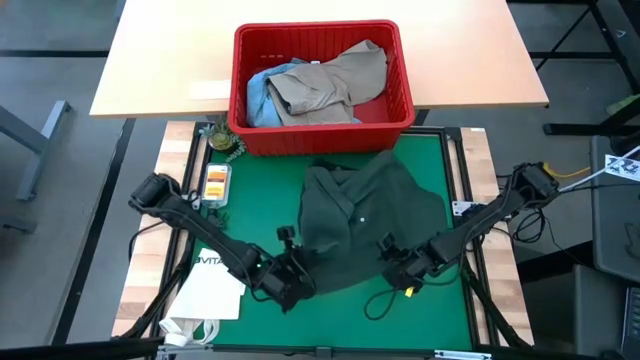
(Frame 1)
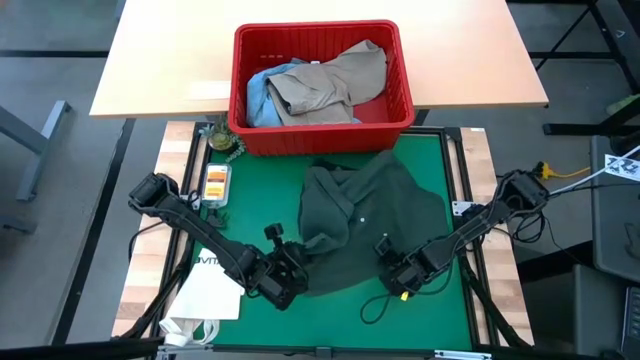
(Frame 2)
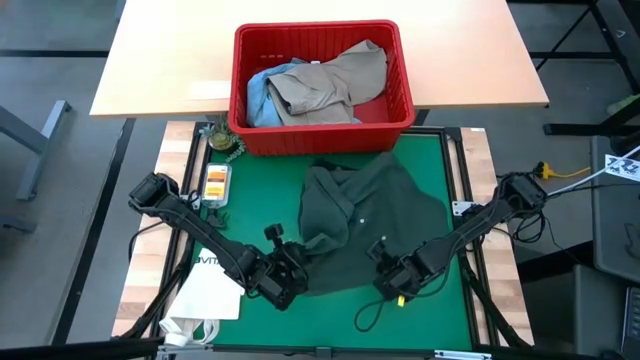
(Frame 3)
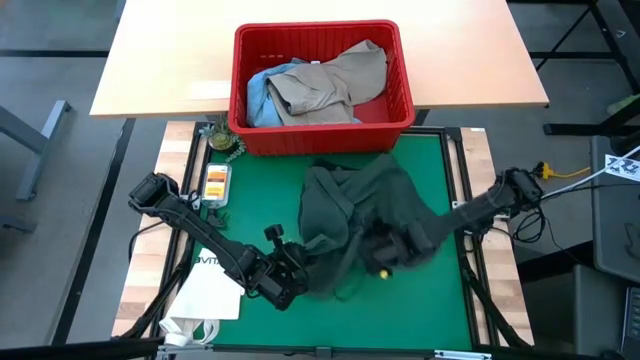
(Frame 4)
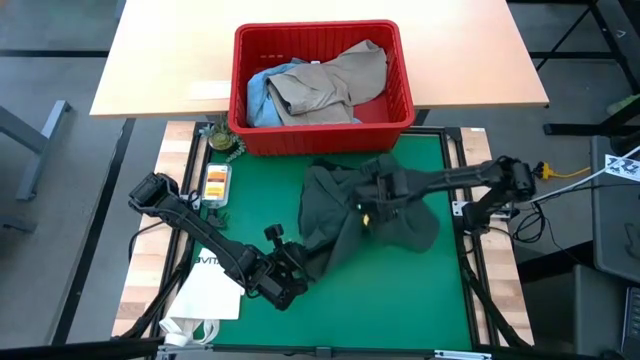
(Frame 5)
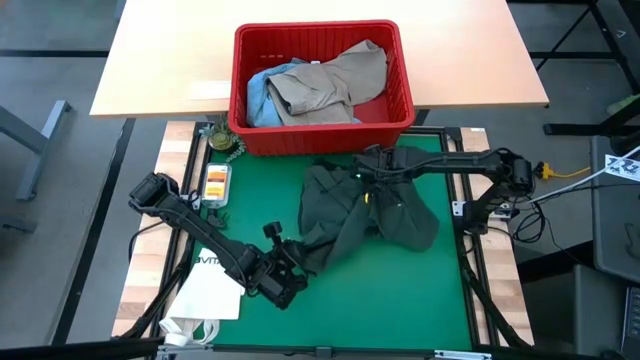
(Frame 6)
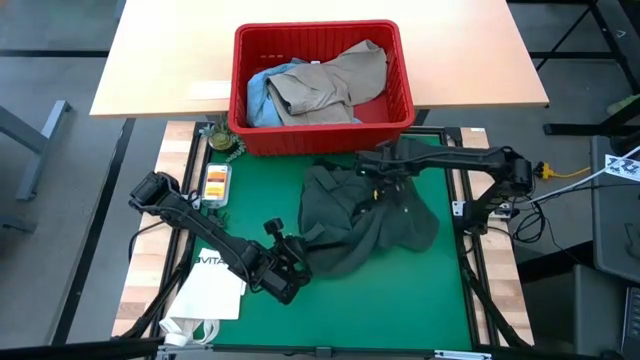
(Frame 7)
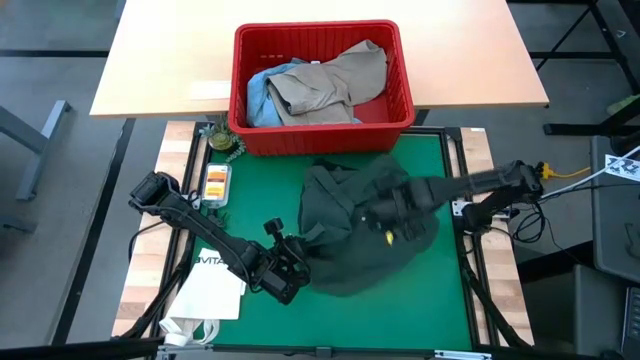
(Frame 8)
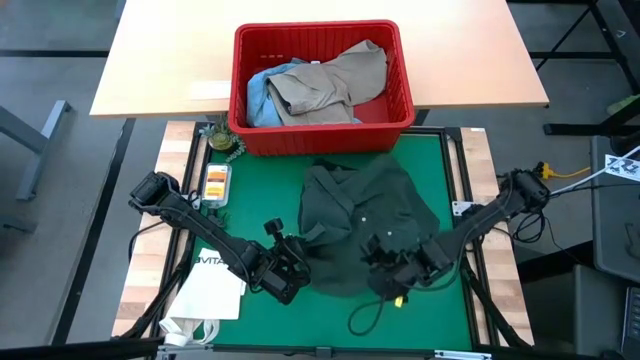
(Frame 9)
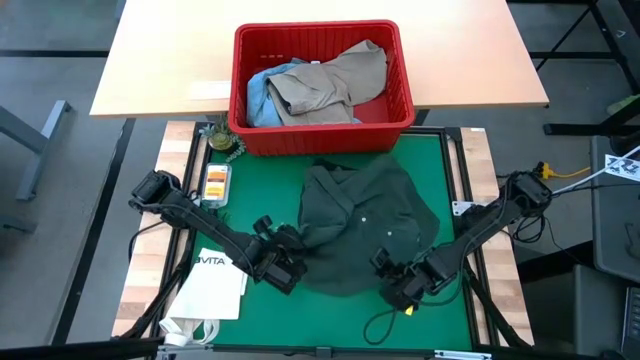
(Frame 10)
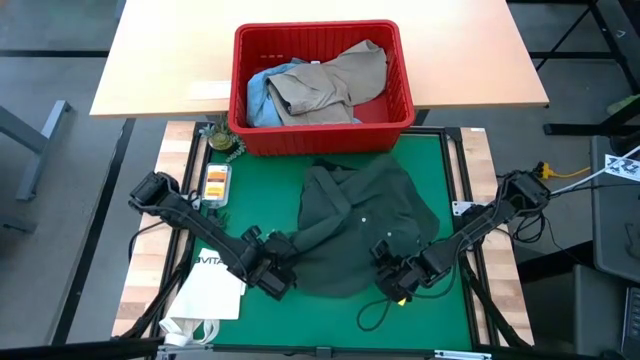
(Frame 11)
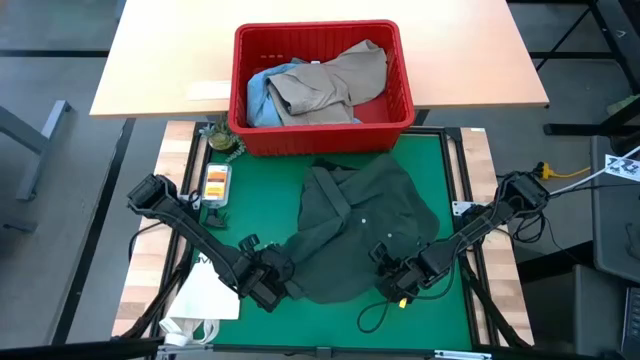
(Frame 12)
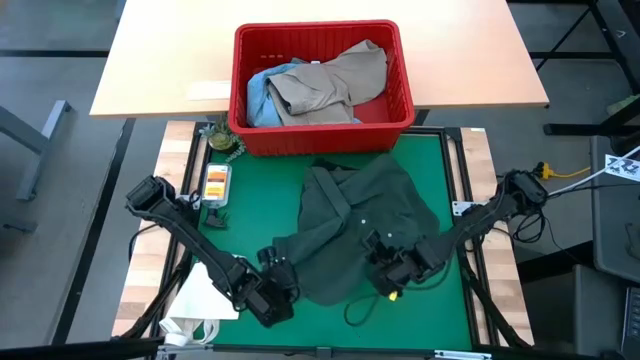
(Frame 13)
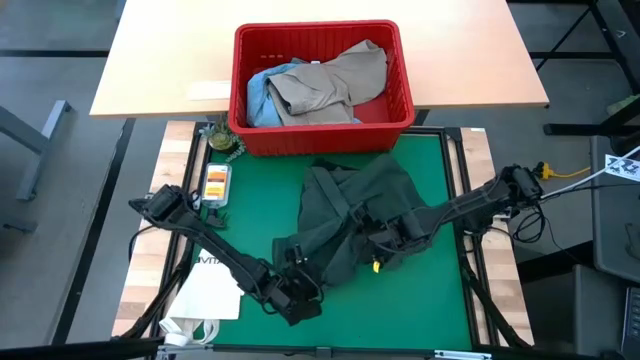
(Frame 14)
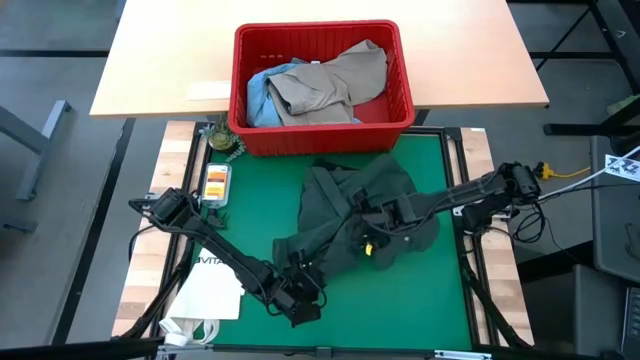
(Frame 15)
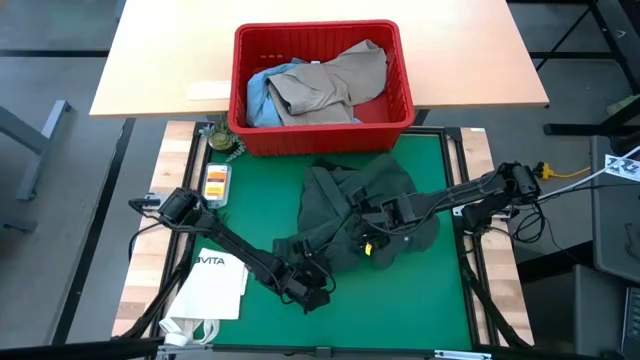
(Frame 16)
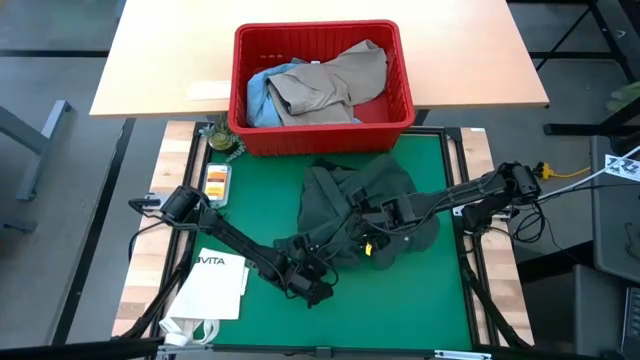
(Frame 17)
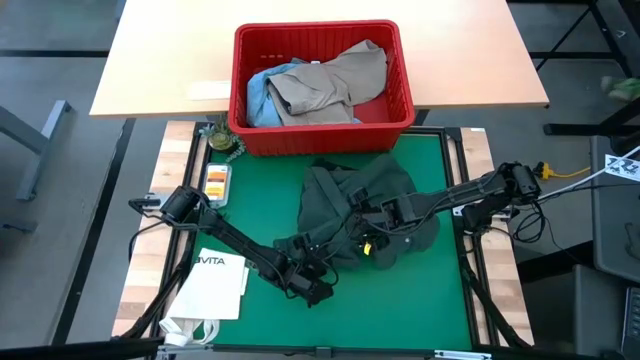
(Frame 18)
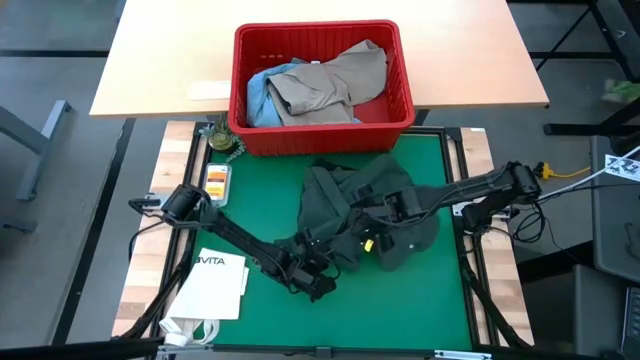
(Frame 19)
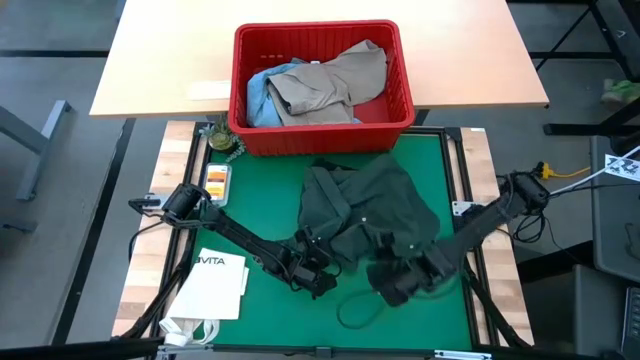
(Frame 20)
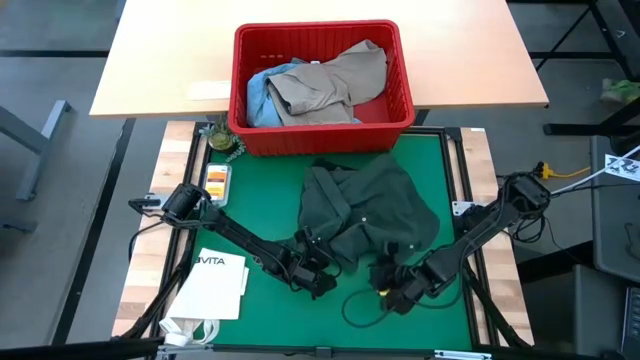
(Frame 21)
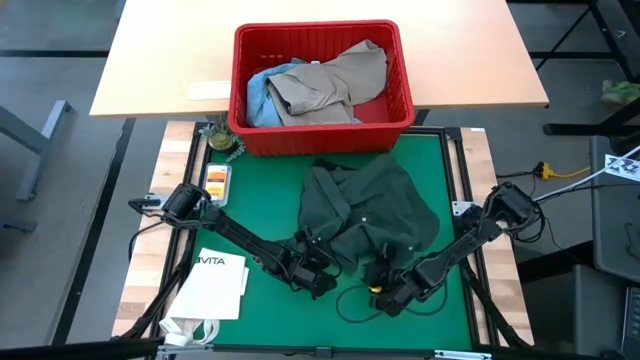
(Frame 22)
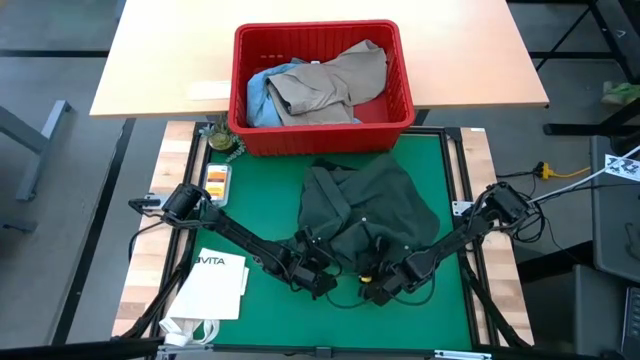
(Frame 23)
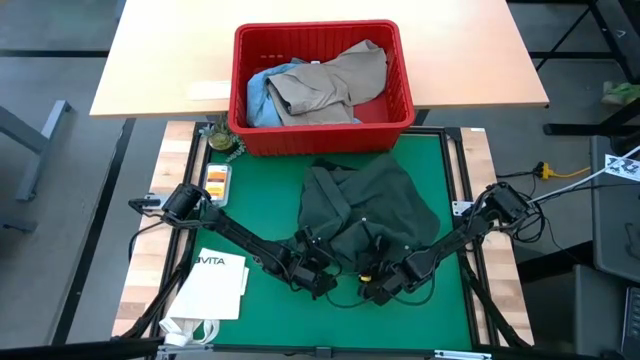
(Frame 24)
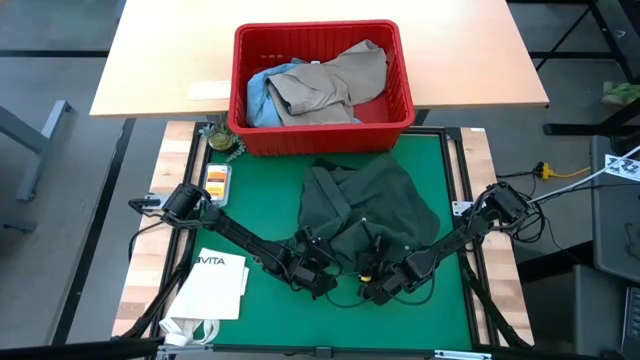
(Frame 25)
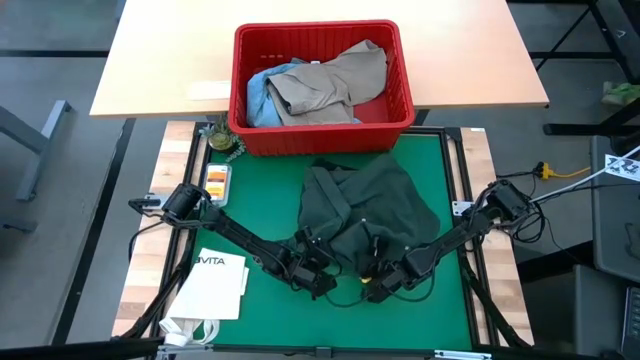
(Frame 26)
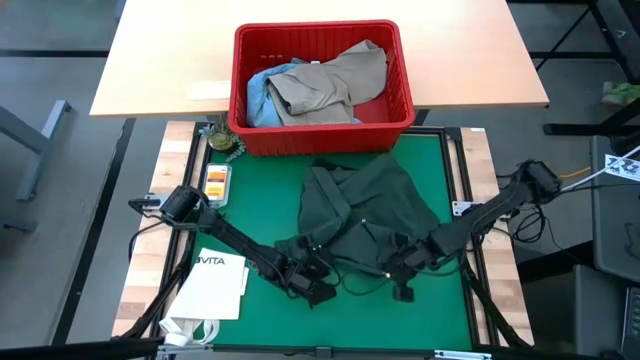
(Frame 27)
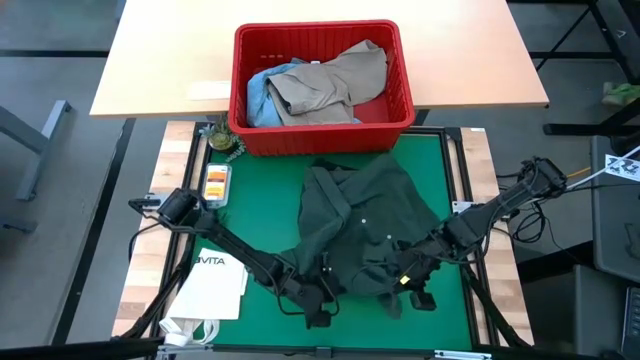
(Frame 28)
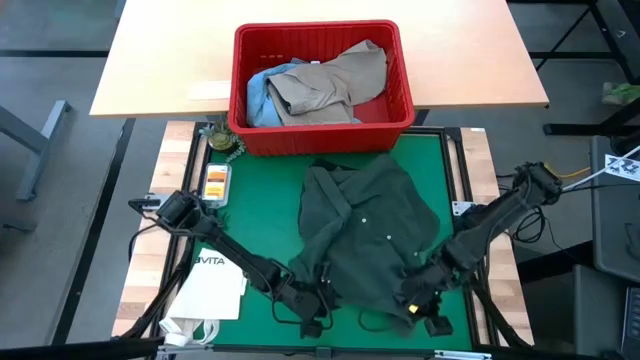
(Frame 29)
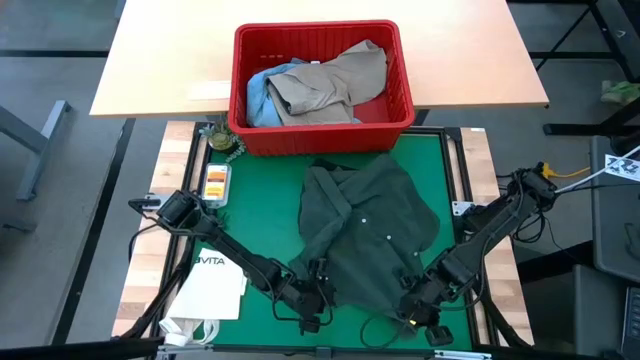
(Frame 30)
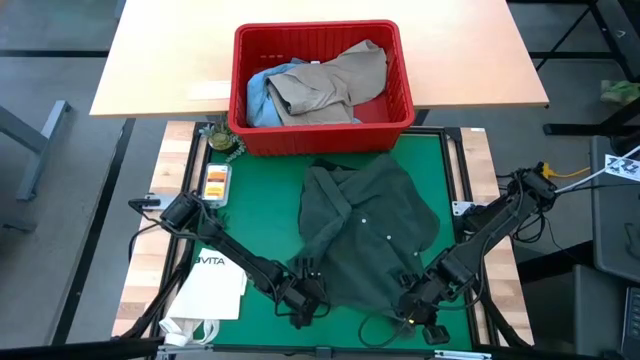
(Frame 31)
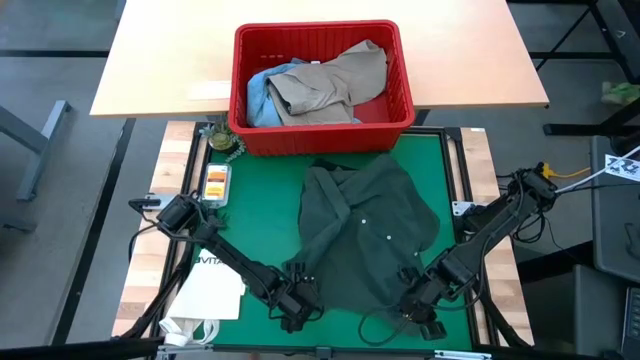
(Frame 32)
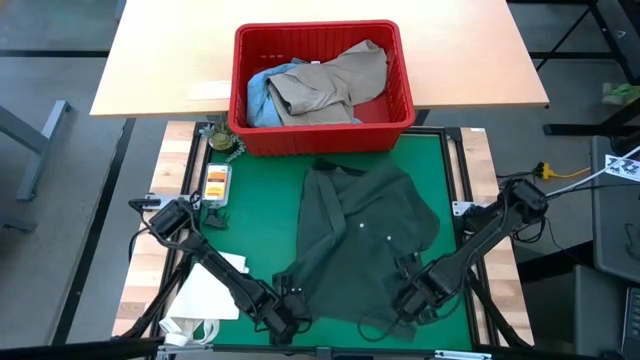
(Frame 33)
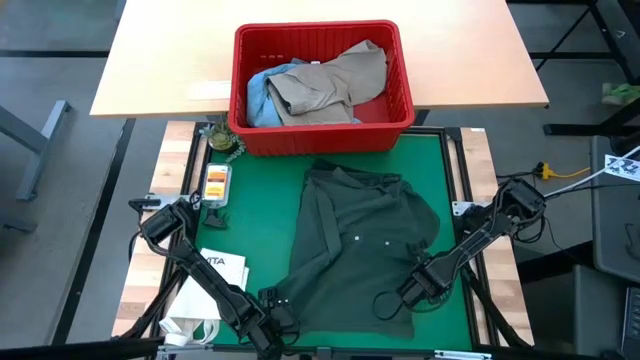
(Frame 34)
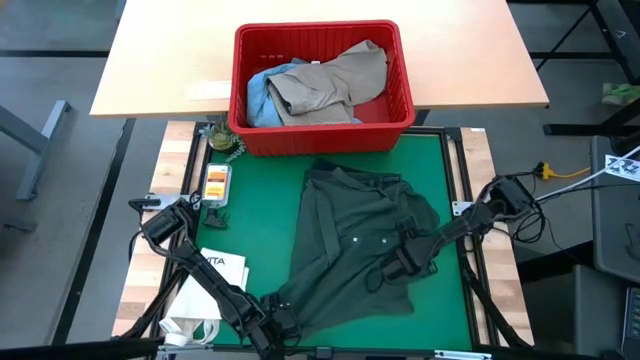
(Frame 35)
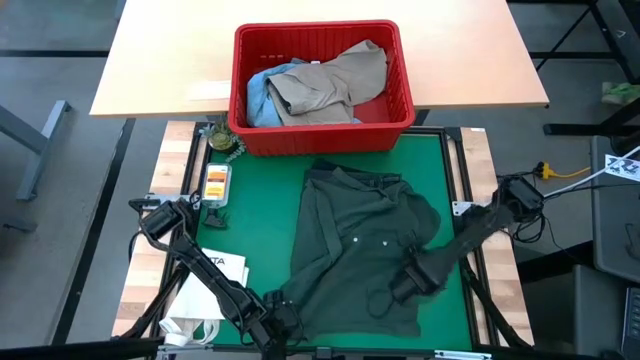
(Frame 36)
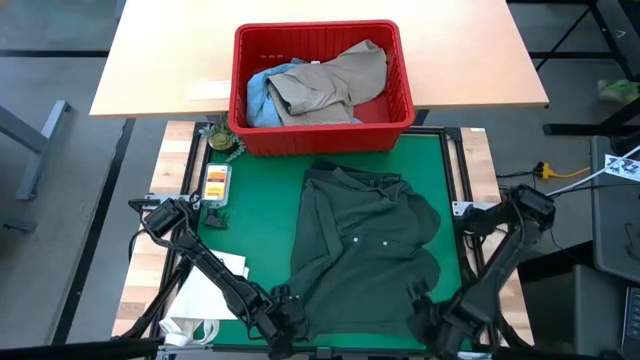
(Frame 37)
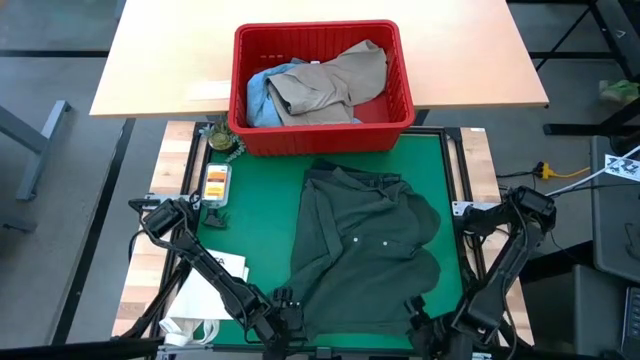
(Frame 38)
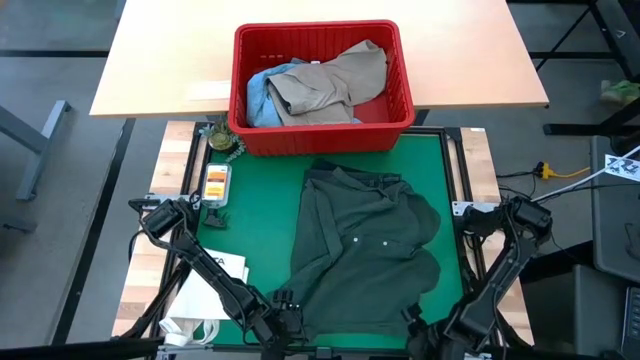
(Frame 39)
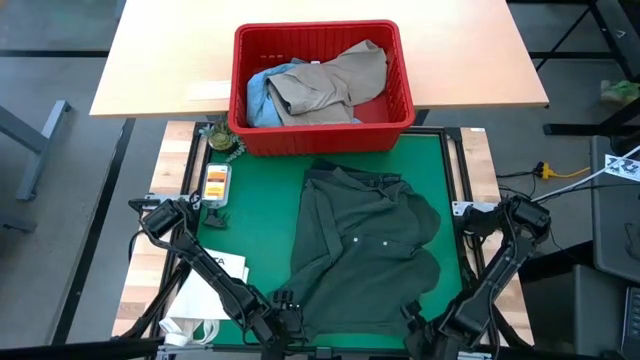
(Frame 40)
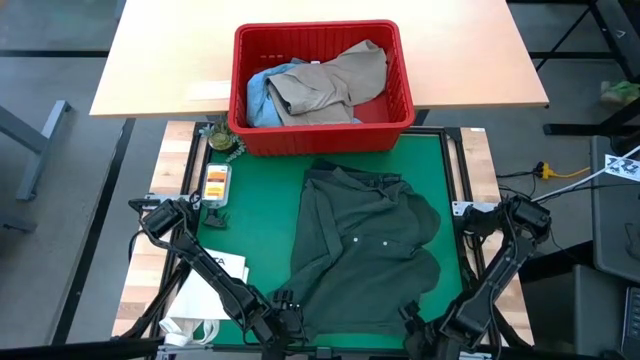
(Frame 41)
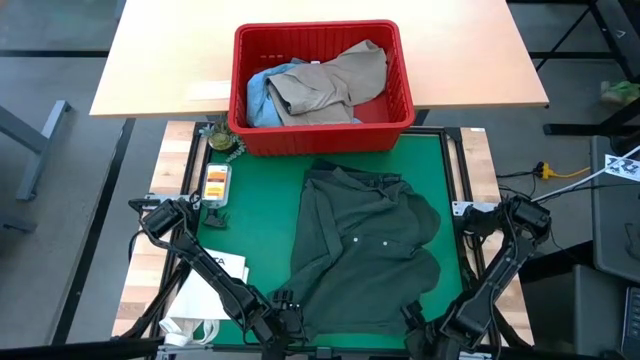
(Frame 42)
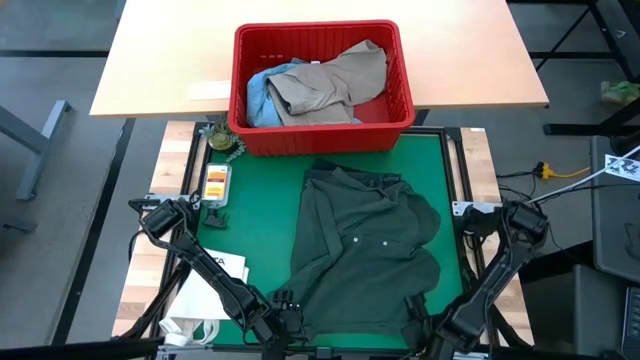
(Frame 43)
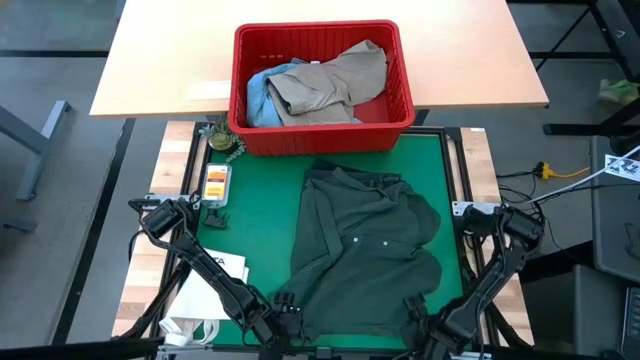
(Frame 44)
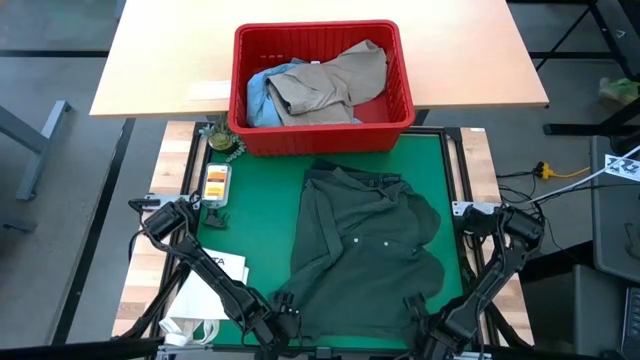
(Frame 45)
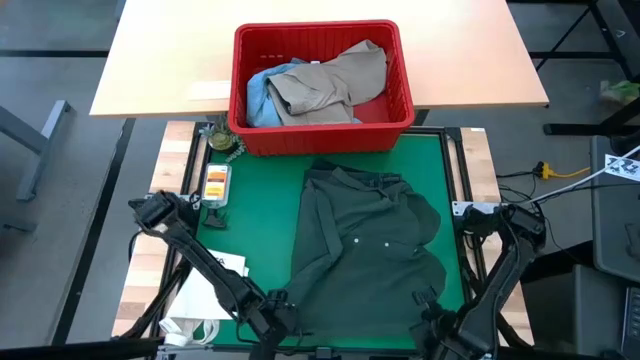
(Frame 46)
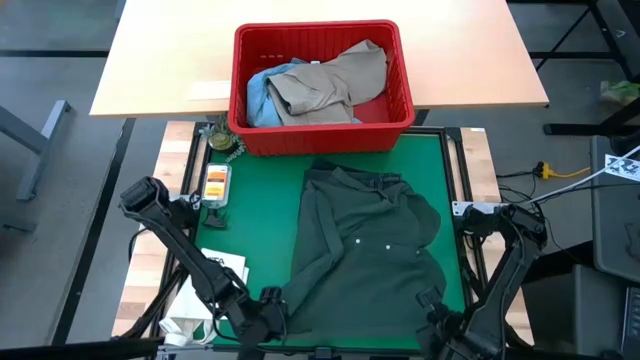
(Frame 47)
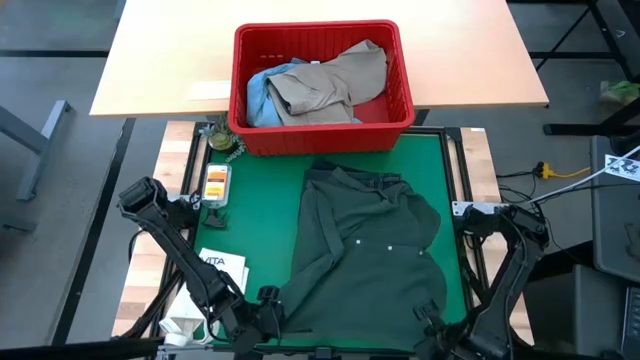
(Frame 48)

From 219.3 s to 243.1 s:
Task: Fold Laundry from Bin
Fold the green shirt
